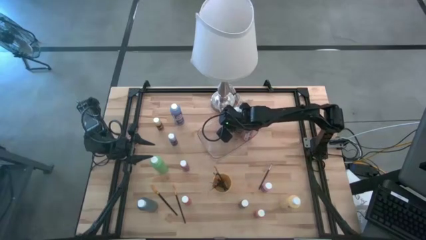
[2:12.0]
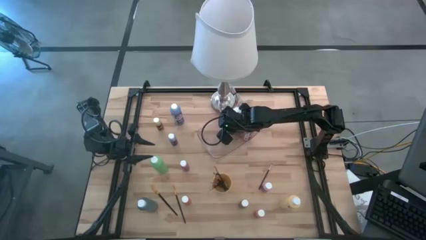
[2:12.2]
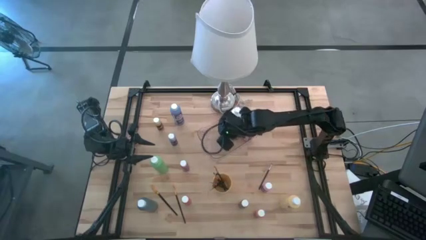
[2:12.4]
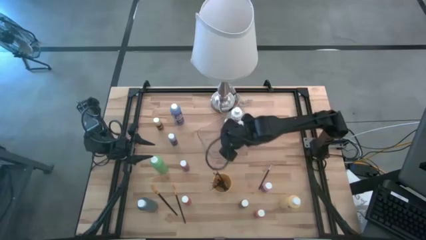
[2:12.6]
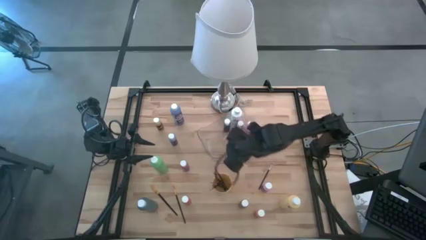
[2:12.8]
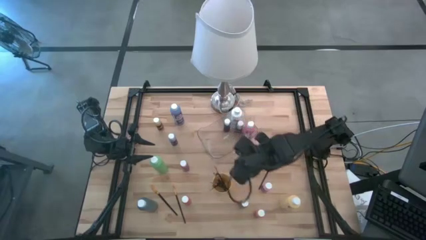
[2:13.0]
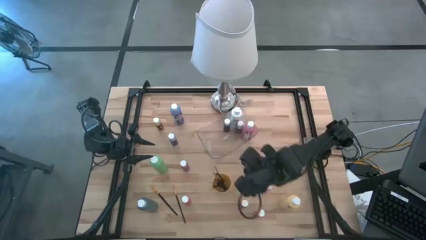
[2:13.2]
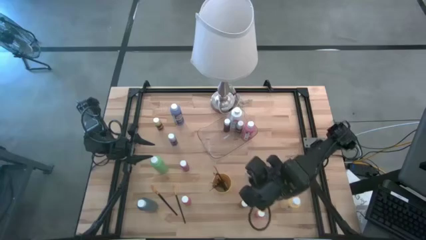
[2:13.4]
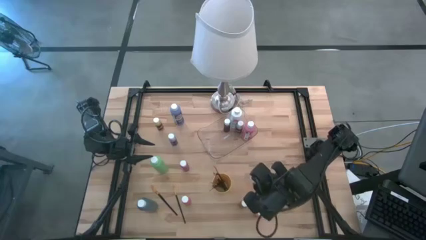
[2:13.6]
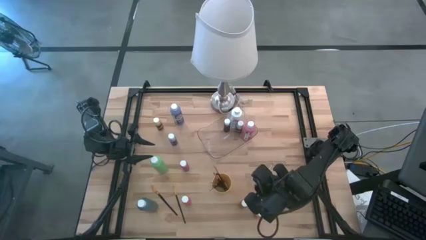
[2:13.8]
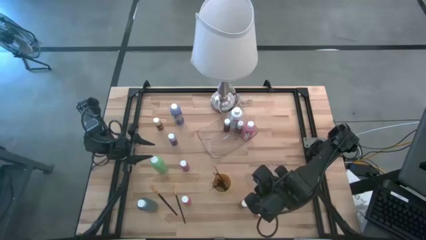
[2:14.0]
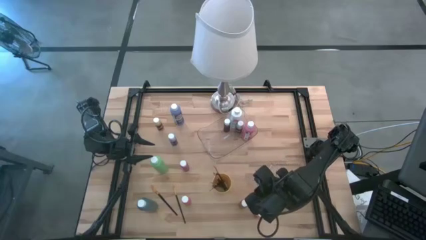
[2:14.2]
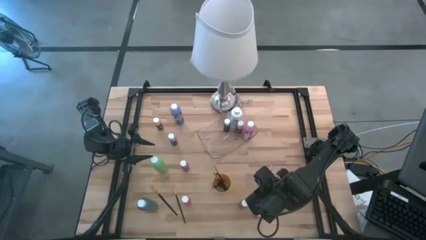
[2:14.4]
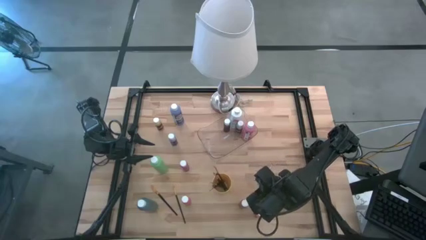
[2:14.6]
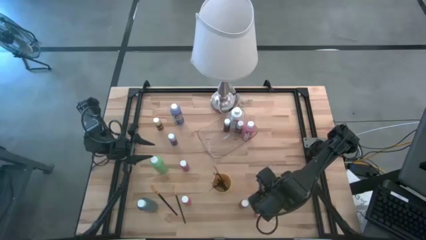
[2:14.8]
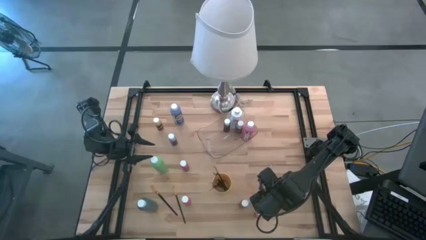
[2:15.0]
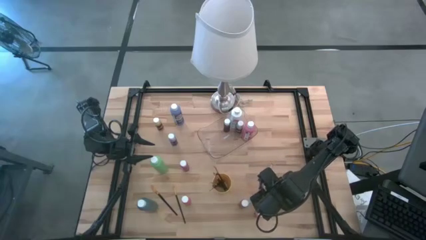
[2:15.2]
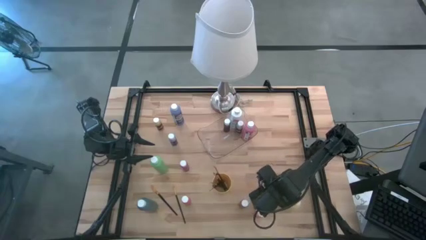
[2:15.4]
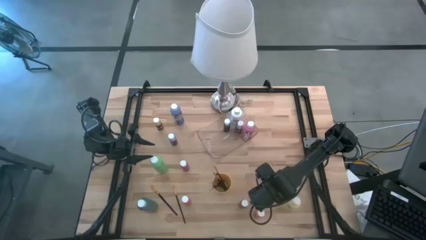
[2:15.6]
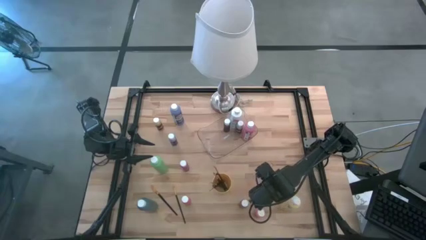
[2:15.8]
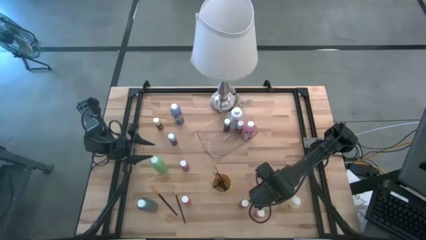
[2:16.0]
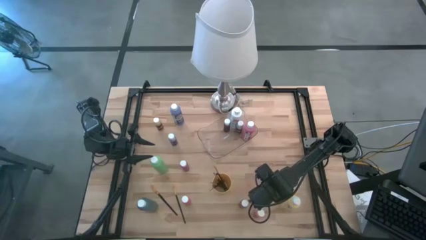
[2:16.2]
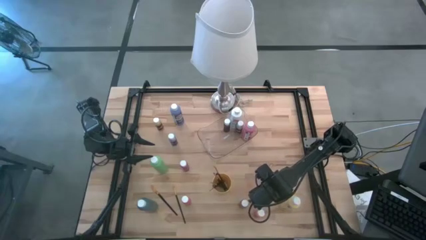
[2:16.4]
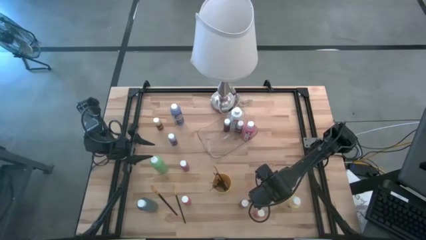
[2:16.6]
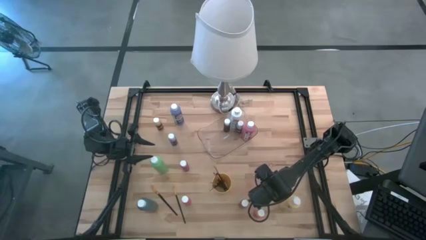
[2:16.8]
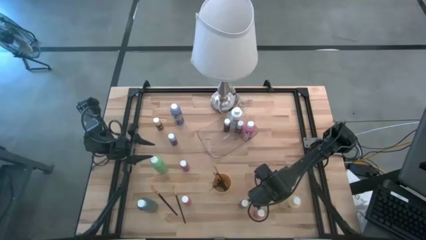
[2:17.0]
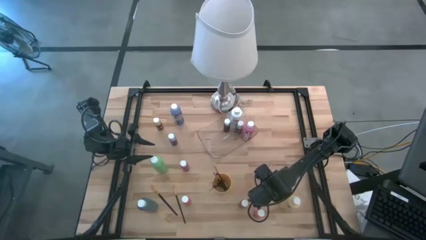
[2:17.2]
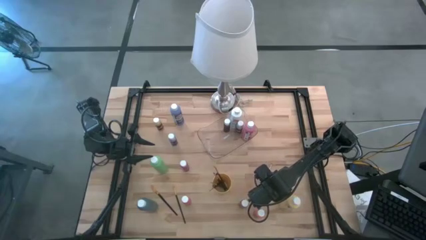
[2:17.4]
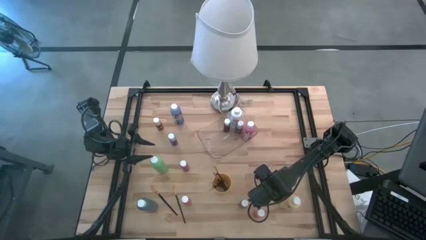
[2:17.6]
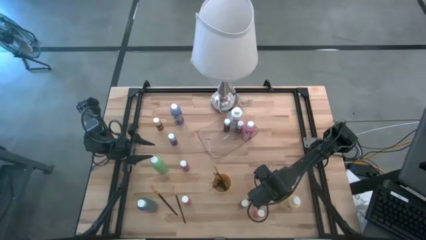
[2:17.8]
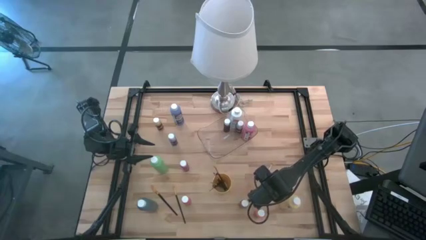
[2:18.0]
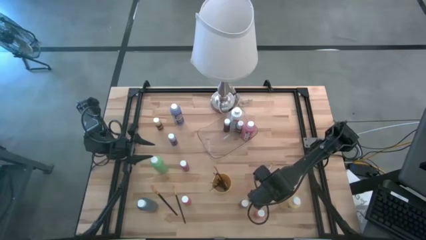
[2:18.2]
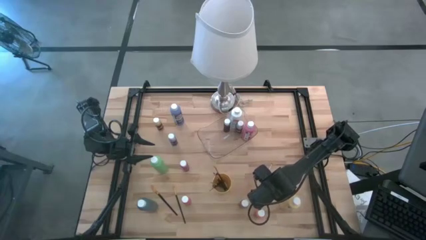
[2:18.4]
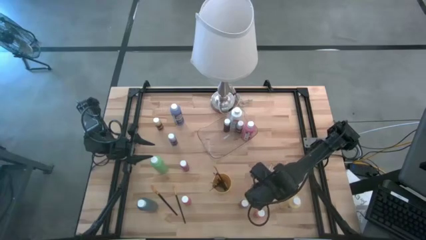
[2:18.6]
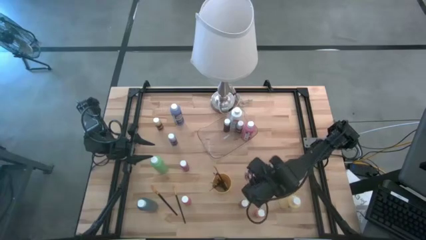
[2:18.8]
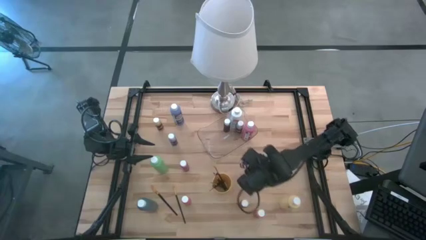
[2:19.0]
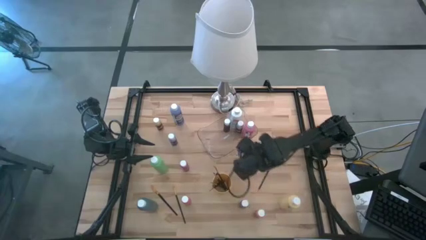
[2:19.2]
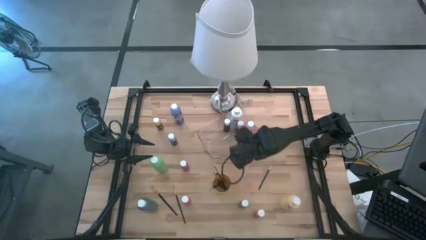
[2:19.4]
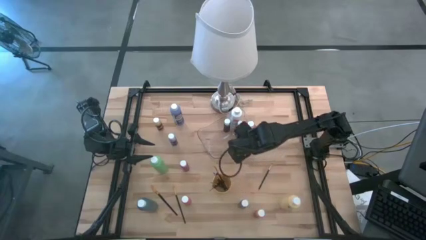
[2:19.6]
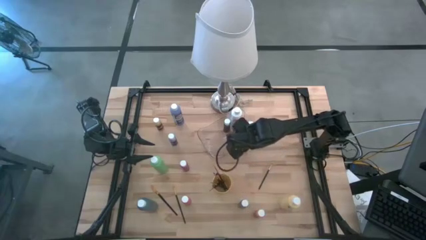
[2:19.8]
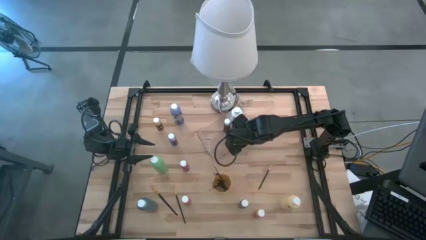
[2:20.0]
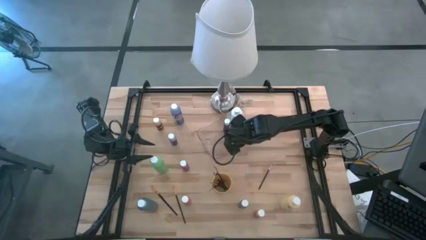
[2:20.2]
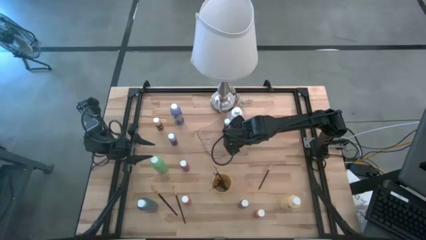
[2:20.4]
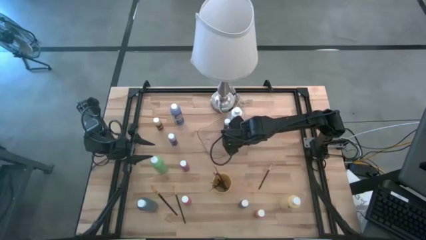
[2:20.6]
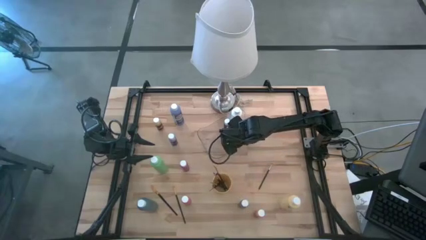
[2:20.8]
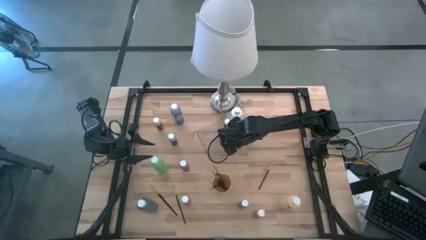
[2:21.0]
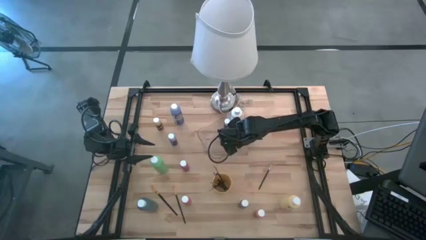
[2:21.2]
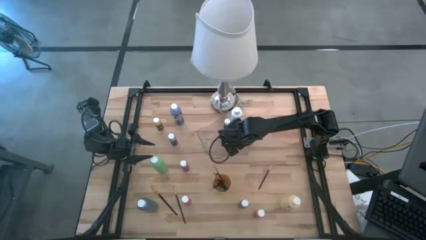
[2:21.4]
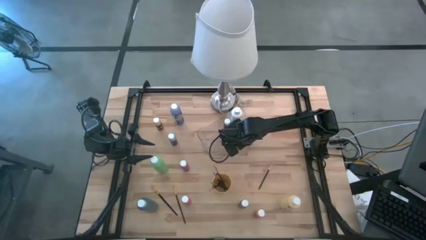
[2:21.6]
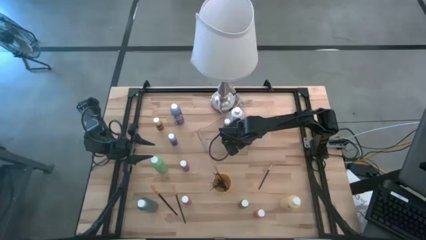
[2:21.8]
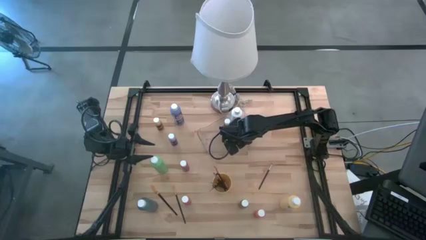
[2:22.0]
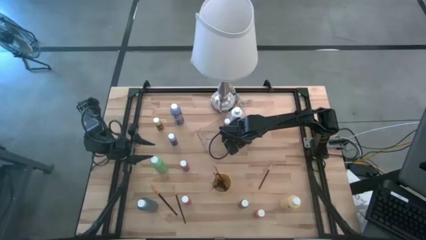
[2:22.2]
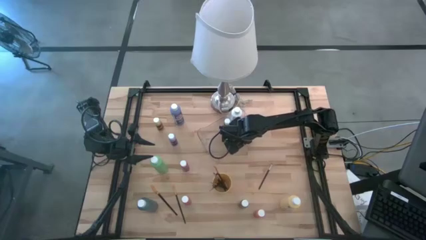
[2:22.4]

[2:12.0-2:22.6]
Task: Pick & Place Paint Supplies
Put the light pink bottle into the transparent bin

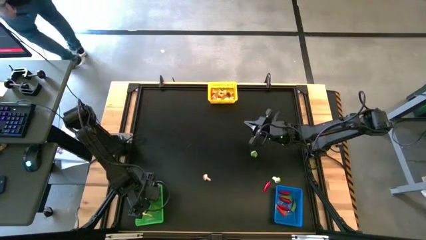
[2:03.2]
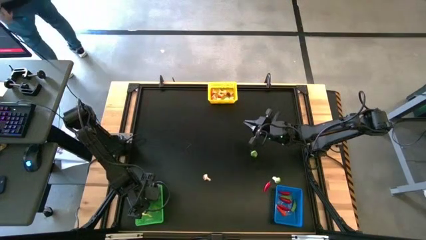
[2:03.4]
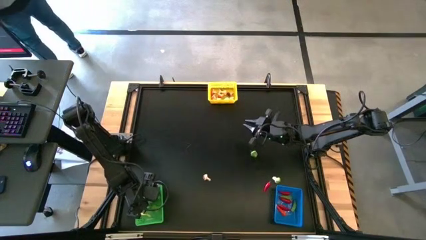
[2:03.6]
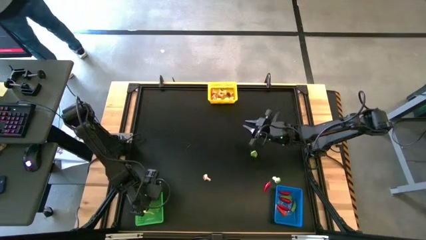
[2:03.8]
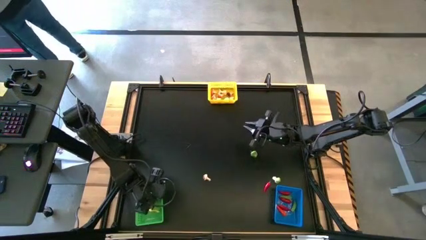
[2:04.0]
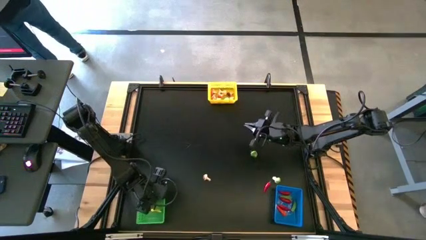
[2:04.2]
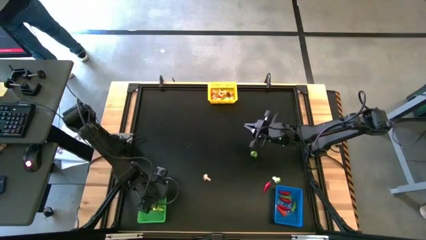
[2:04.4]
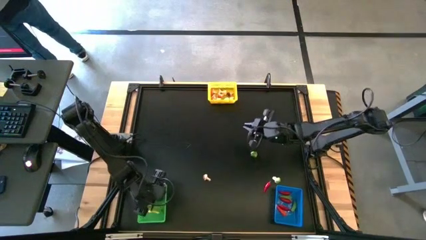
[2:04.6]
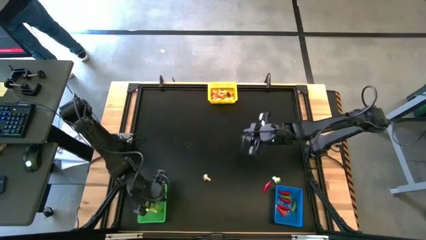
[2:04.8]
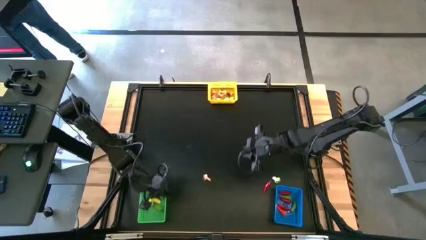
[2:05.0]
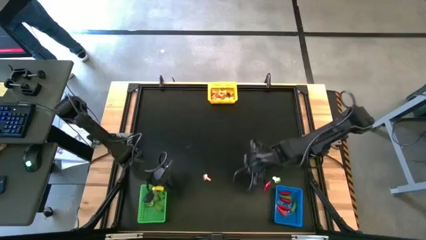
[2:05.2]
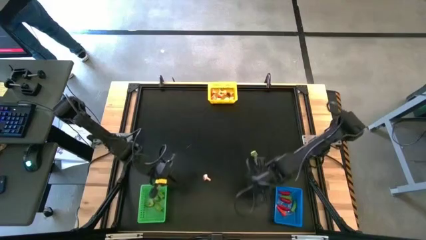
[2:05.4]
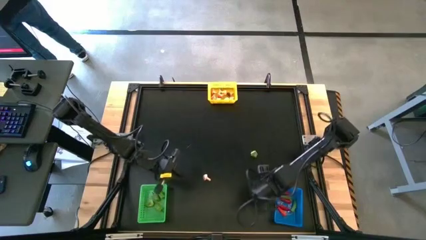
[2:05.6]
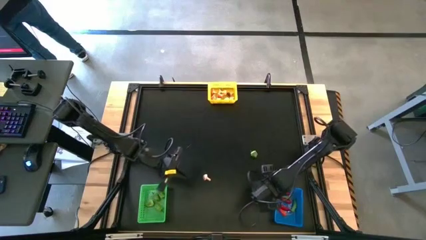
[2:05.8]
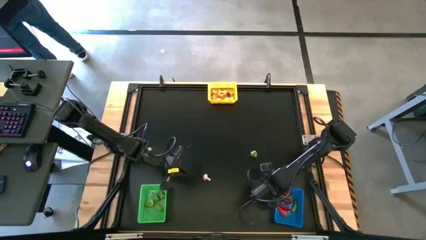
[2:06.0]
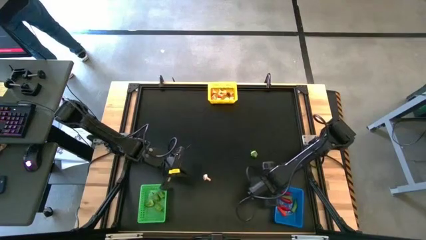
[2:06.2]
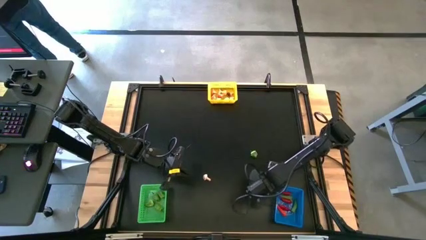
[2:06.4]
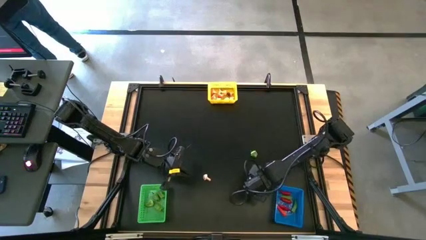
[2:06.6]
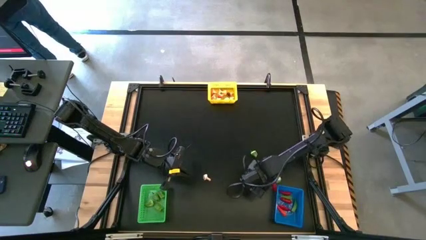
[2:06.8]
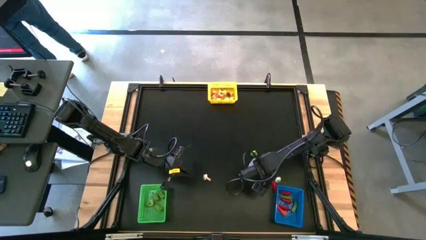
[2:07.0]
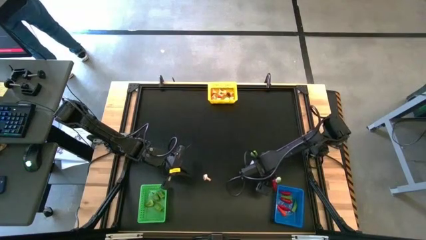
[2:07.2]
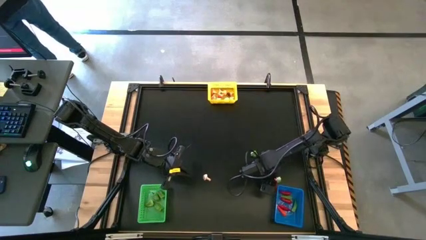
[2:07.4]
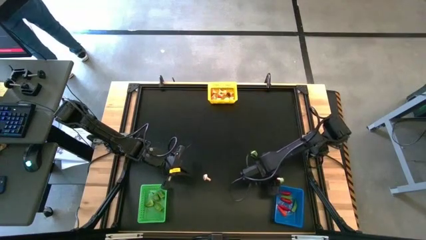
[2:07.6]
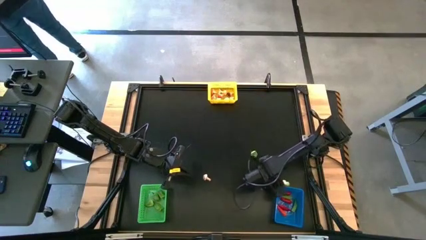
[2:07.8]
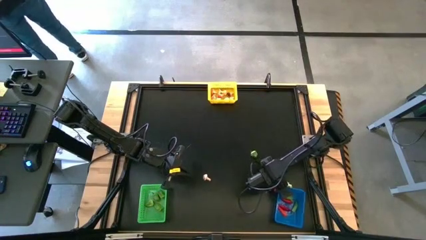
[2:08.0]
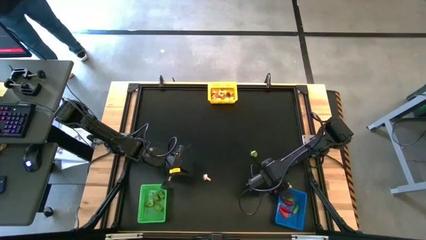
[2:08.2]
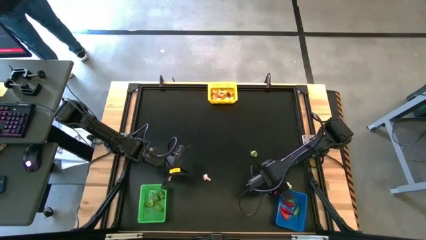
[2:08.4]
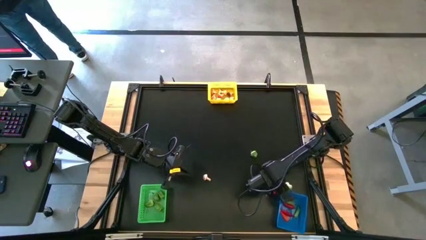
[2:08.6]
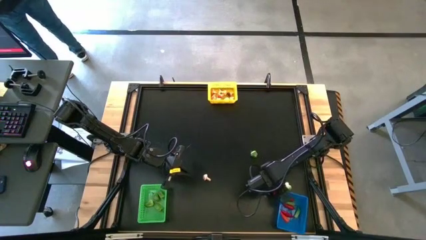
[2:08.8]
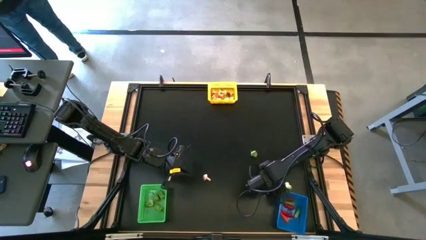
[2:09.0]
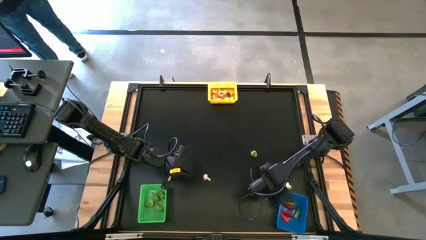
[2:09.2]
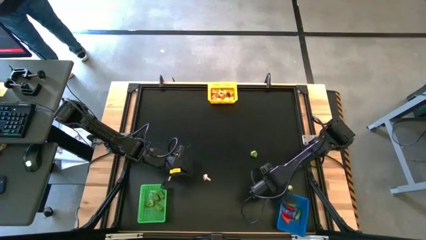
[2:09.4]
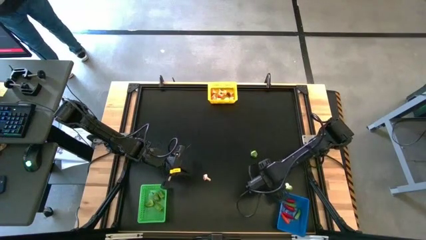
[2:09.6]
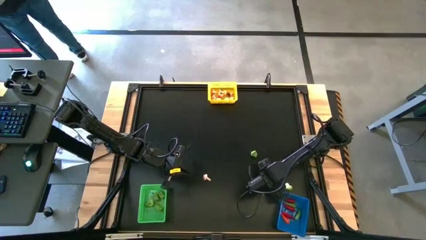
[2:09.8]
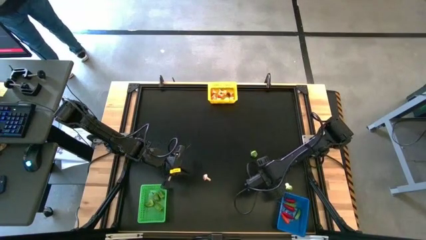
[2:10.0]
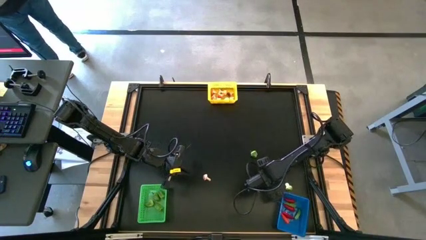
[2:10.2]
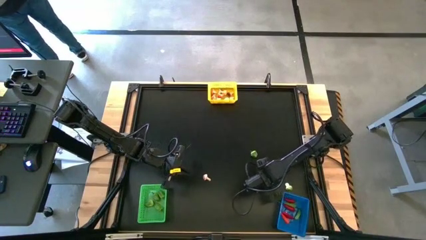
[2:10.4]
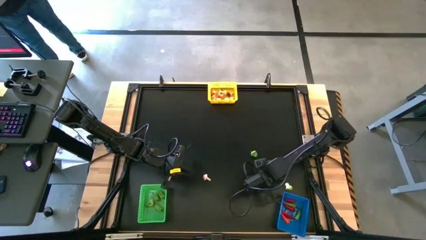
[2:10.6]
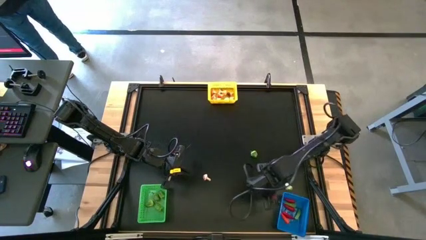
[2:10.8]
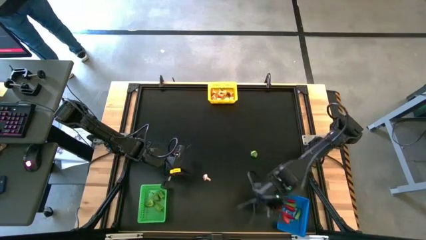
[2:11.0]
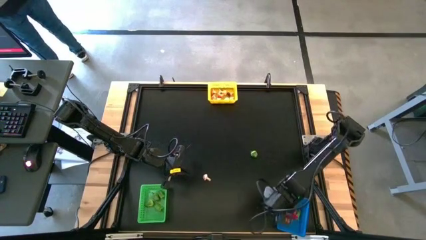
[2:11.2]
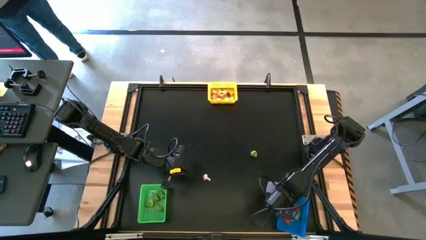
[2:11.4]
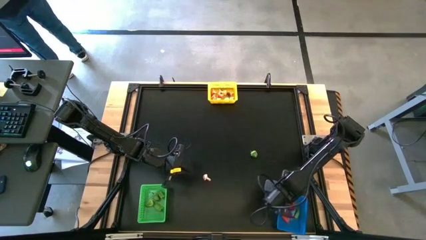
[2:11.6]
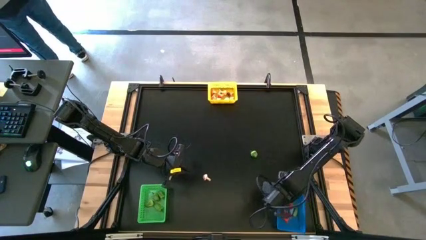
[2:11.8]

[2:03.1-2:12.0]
Task: Sort produce into baskets
Put the red chili into the blue bin
